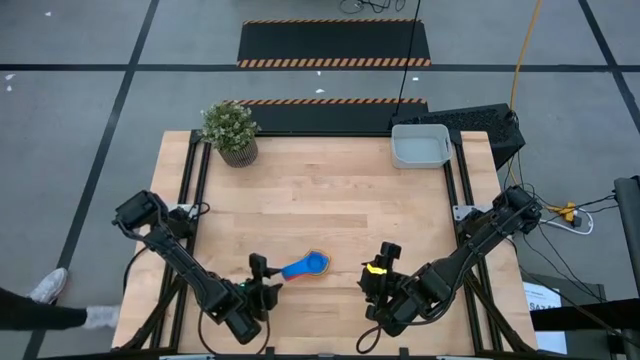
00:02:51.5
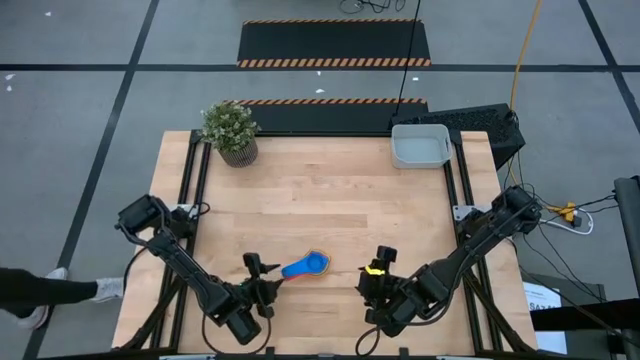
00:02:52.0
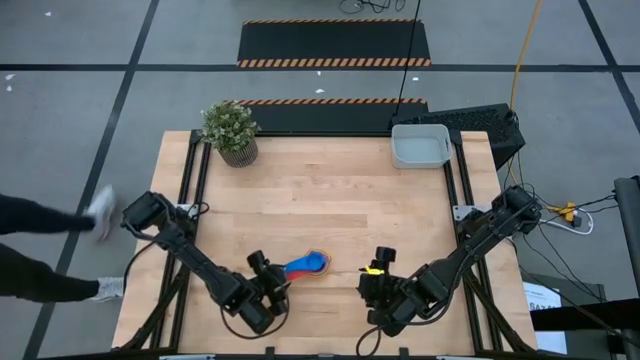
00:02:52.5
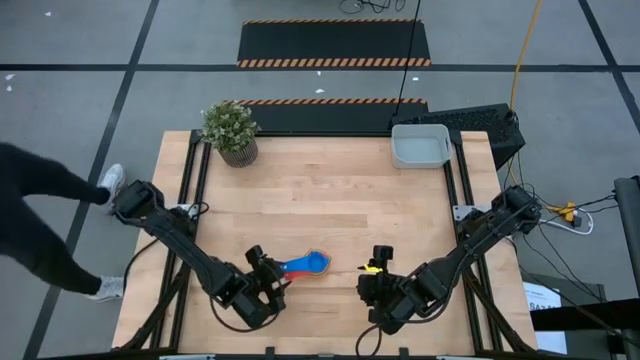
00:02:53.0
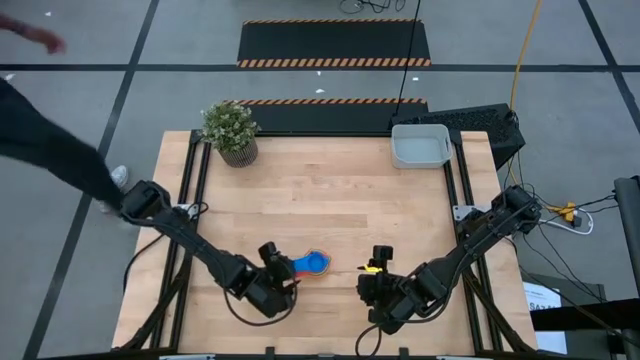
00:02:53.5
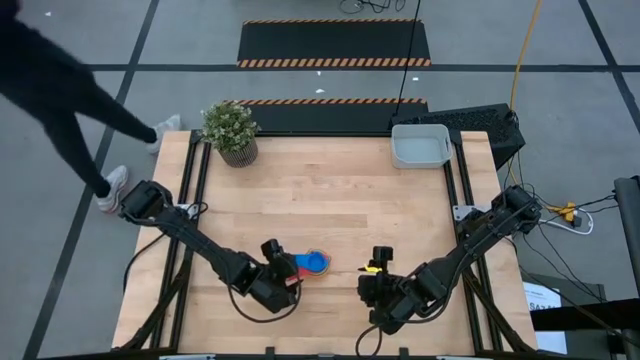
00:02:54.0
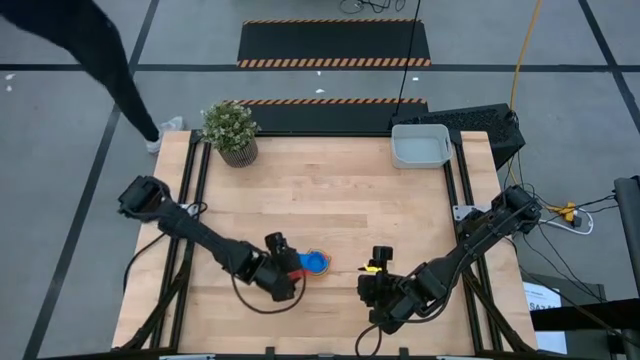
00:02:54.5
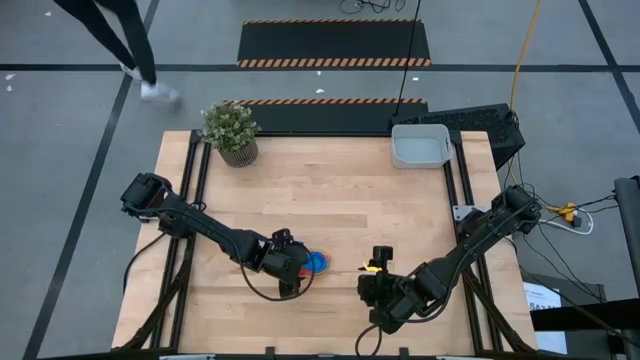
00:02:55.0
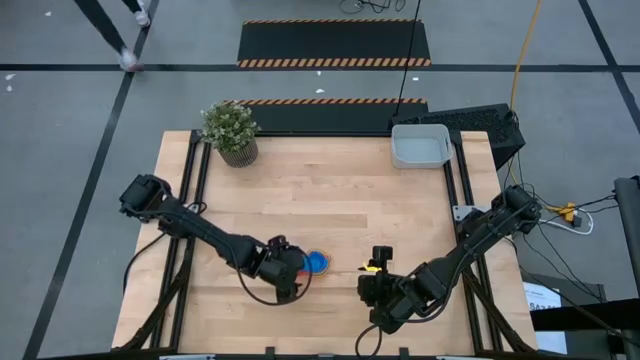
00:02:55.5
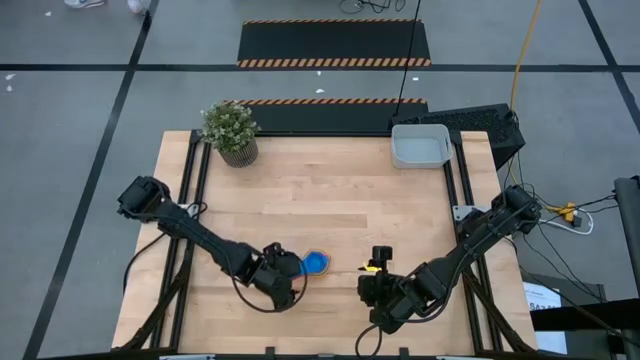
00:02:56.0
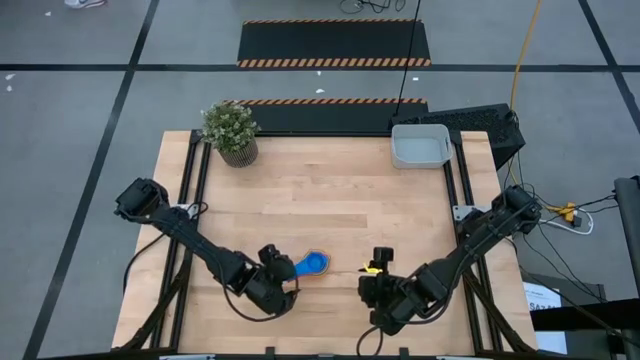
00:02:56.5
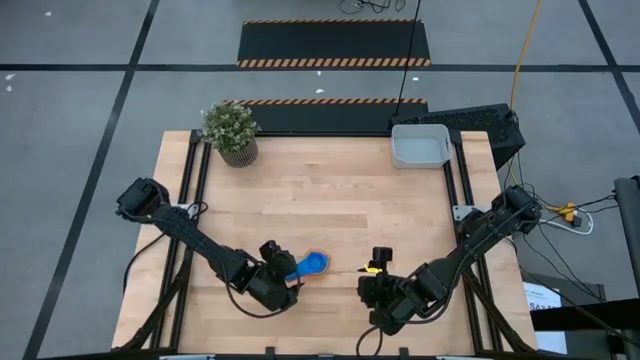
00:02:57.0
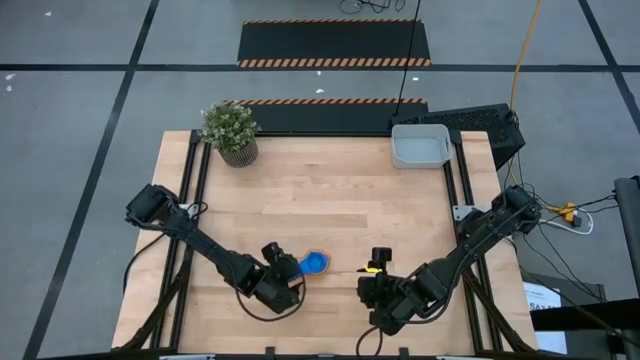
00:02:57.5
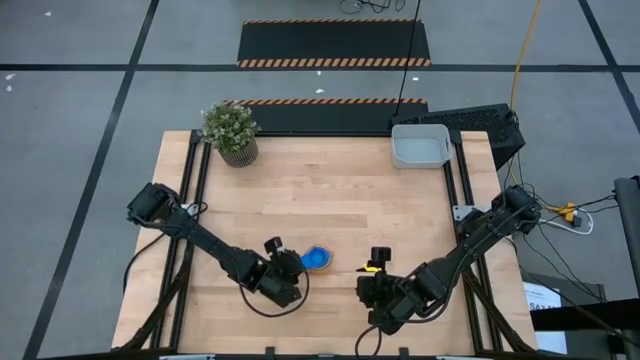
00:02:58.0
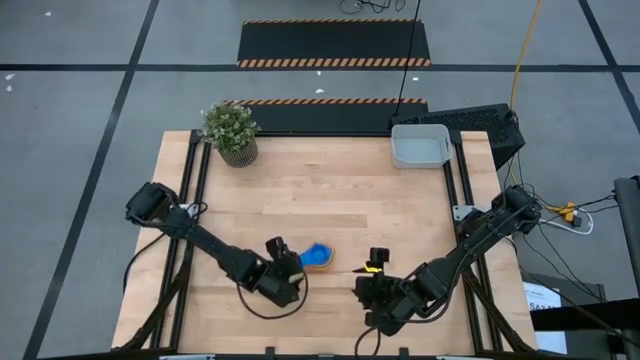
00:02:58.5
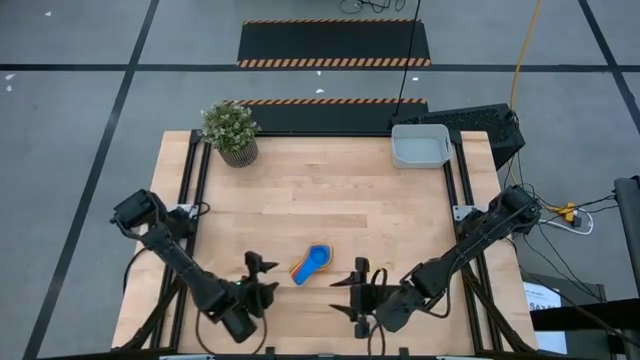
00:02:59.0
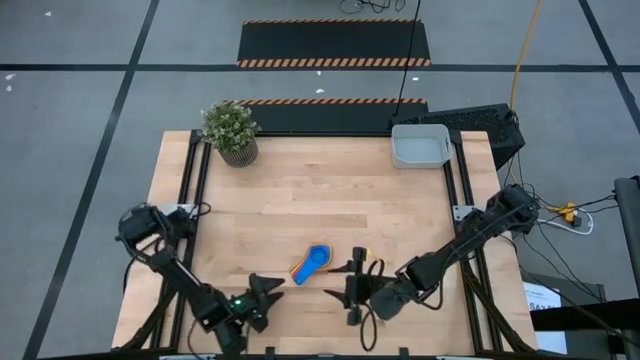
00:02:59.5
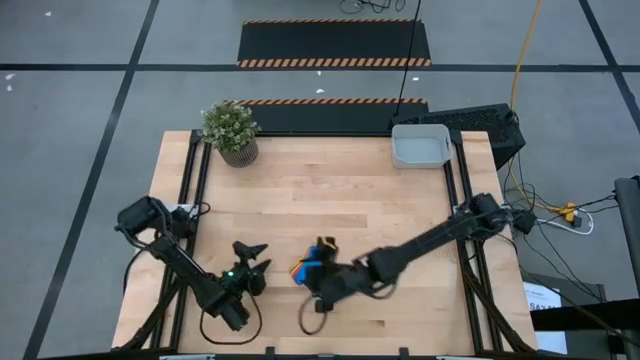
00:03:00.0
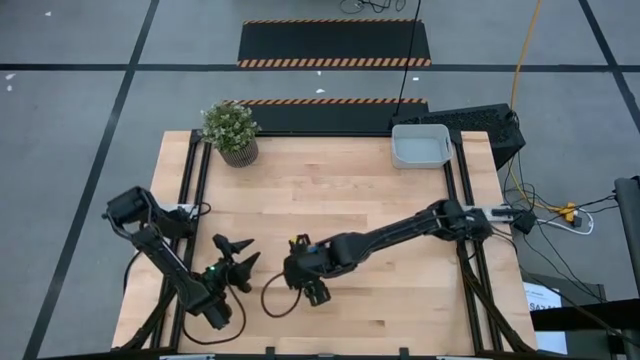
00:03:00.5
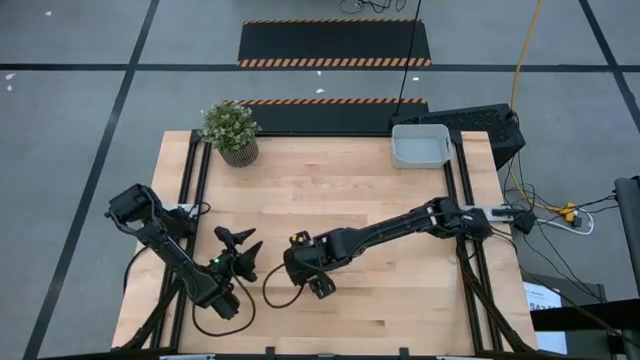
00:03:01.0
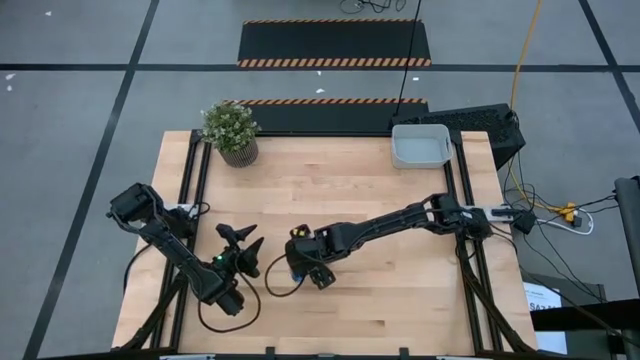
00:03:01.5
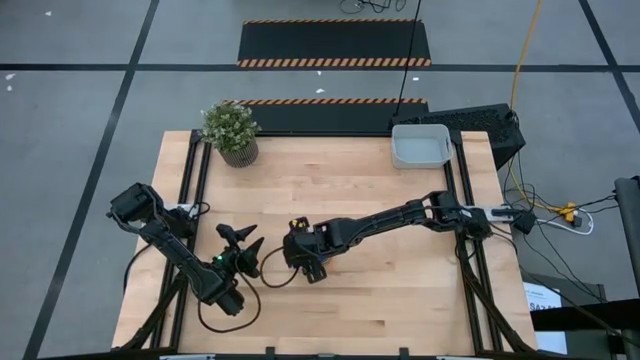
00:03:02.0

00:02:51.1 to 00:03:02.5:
Task: Nest measuring cups in basket
Adjust the stacked measuring cup on the table

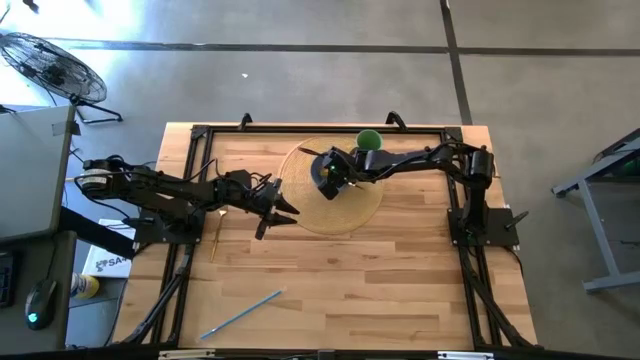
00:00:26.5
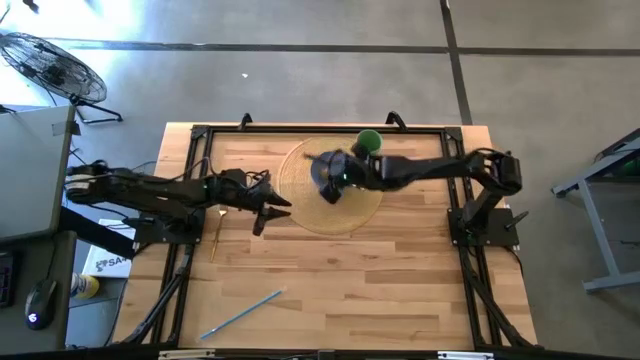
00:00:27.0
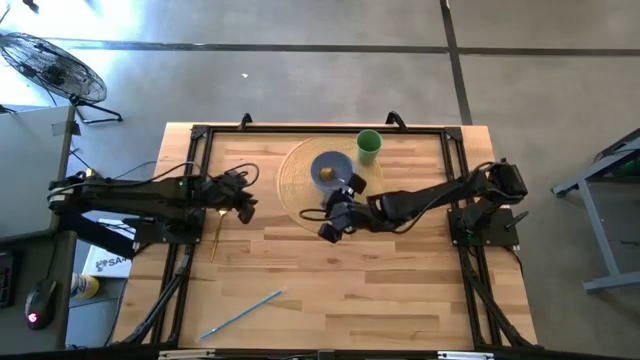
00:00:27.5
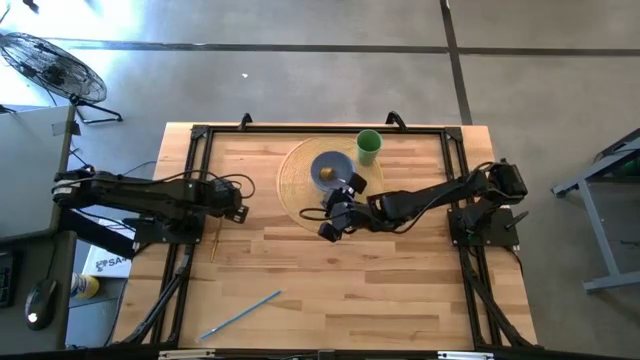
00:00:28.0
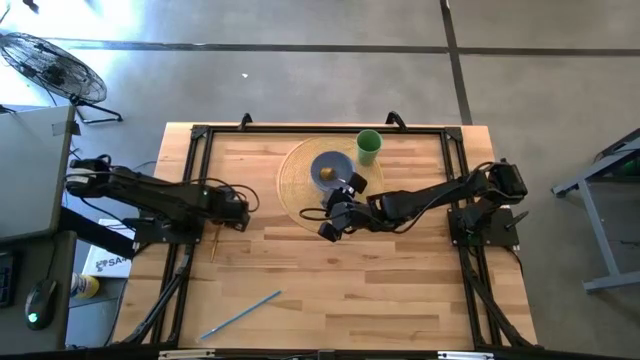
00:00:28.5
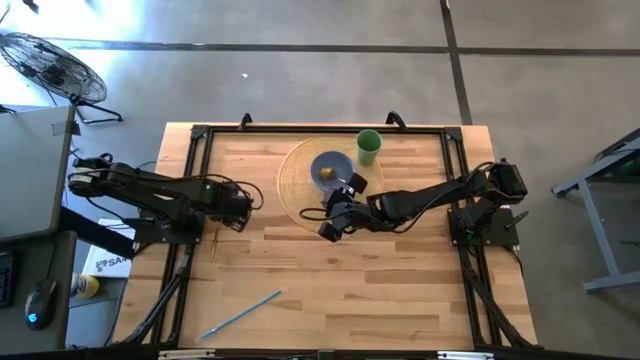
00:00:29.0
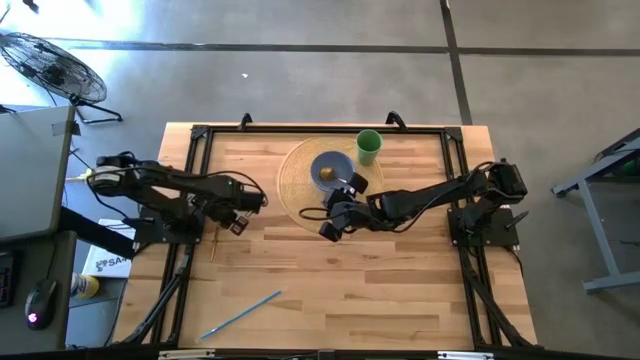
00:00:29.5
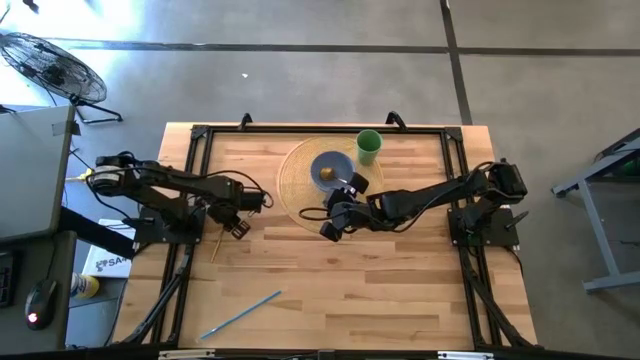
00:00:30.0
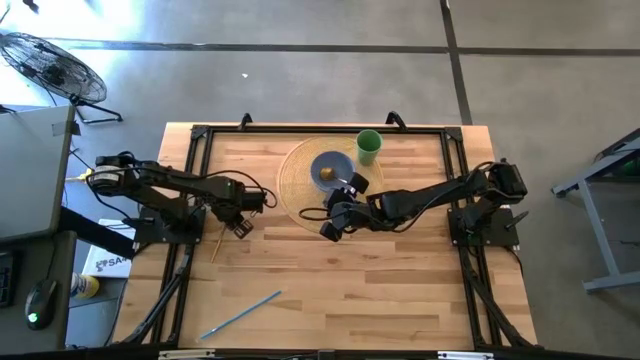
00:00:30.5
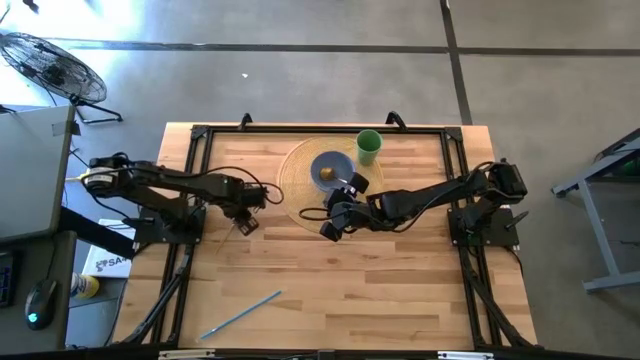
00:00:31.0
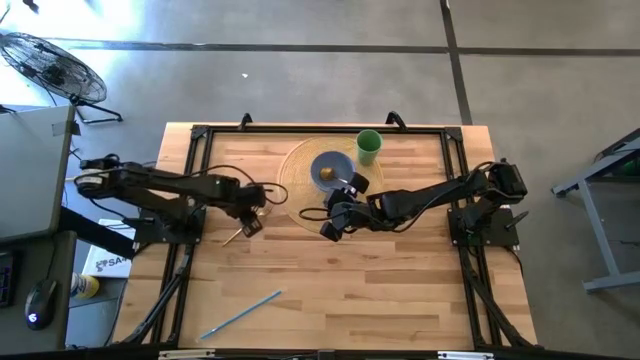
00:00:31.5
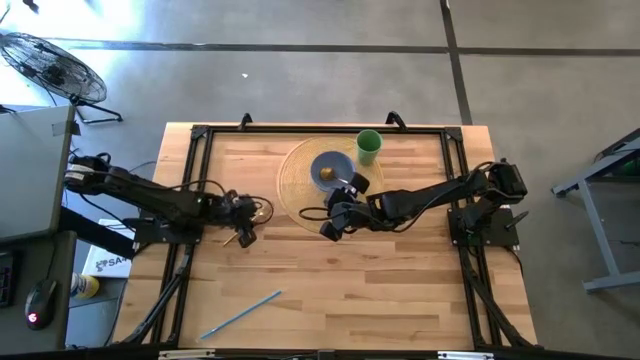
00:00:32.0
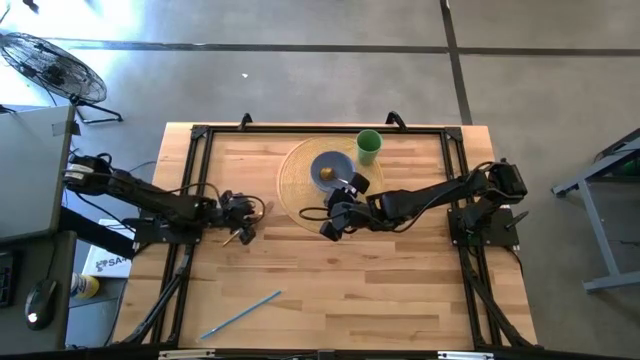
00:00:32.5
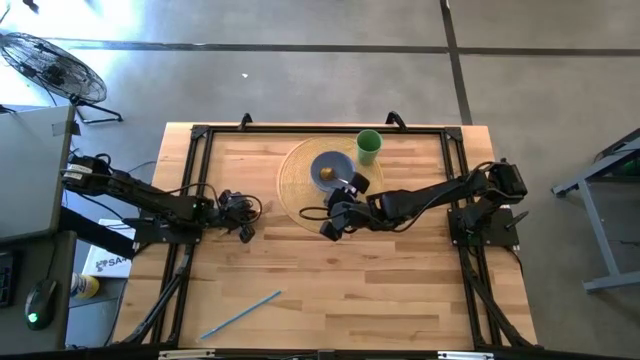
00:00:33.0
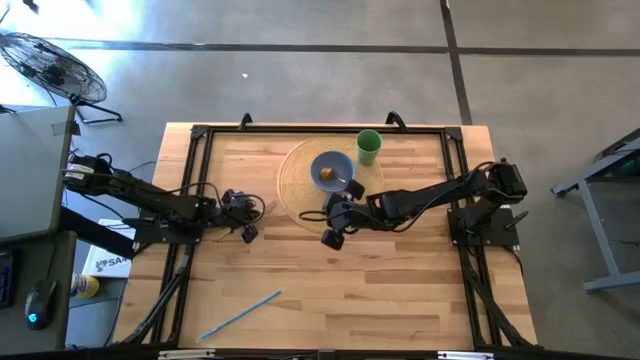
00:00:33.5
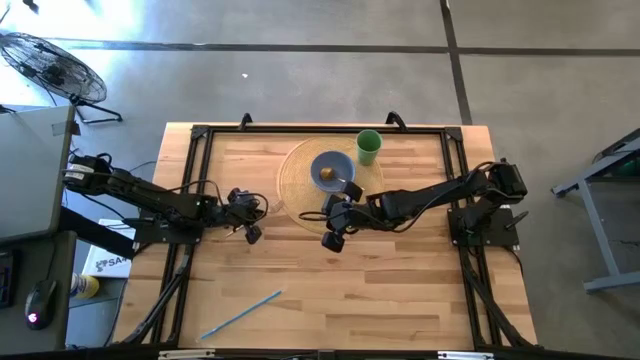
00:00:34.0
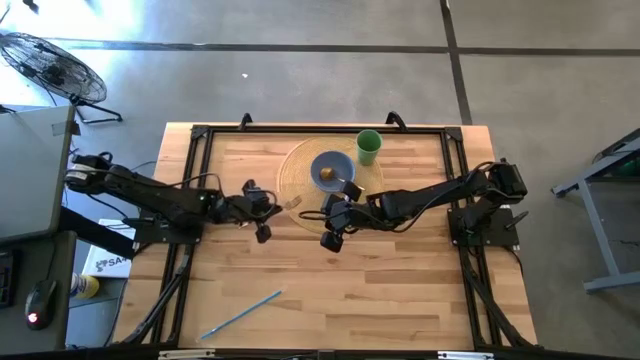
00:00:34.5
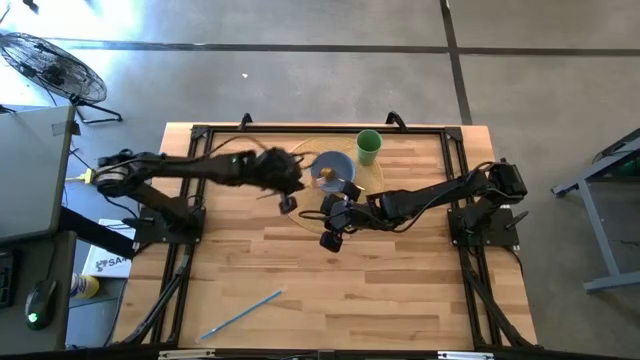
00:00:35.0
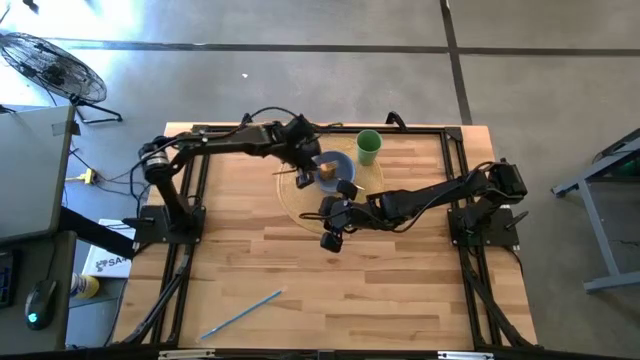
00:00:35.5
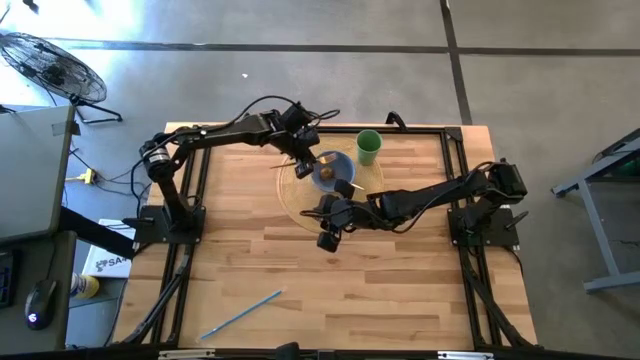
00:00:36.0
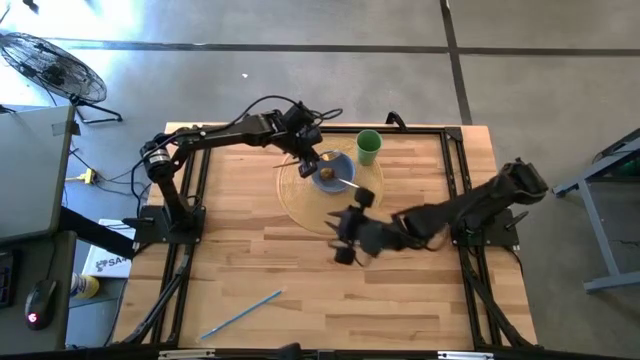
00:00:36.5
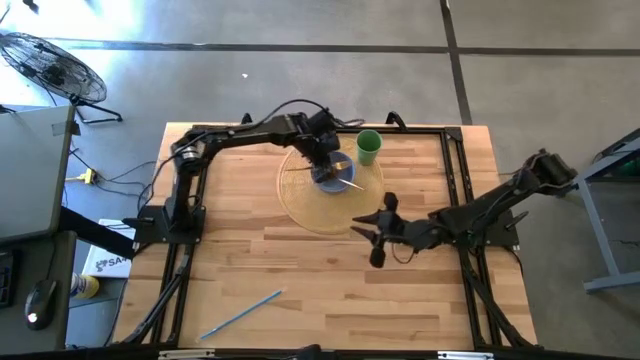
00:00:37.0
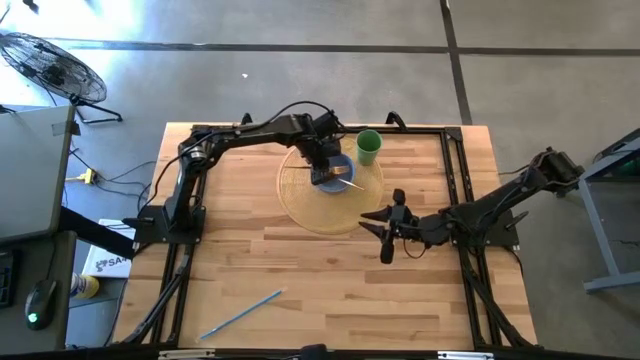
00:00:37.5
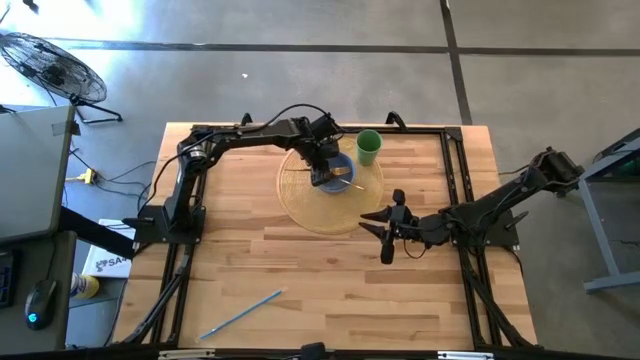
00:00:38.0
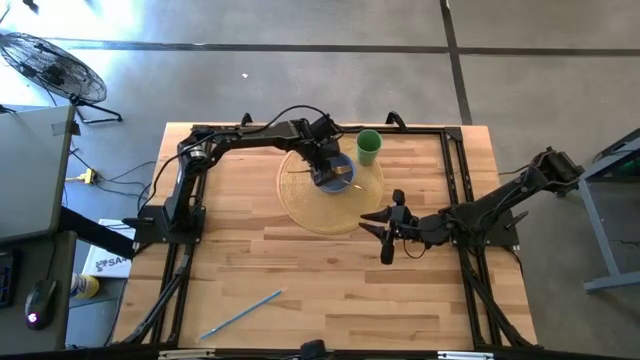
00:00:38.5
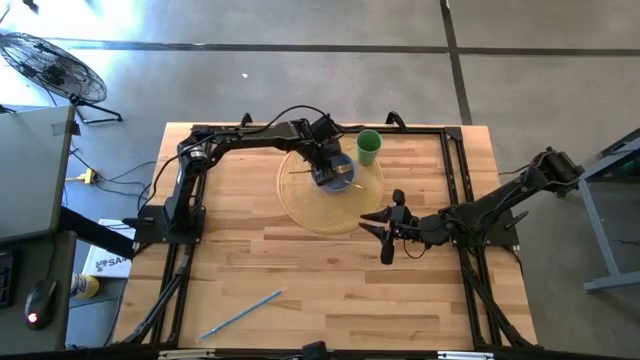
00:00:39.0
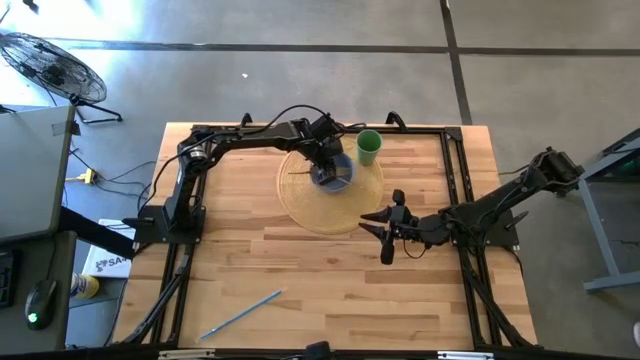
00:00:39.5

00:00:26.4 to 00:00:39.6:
Task: Pick & Place Utensil
Put the gold fork into the blue bowl
